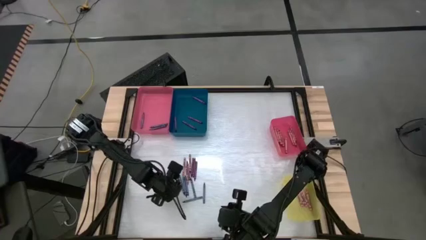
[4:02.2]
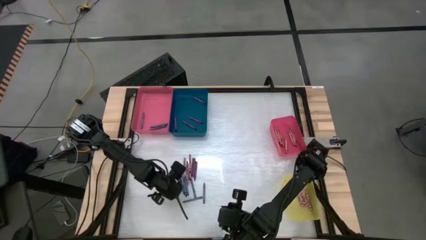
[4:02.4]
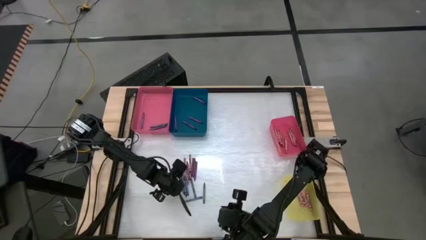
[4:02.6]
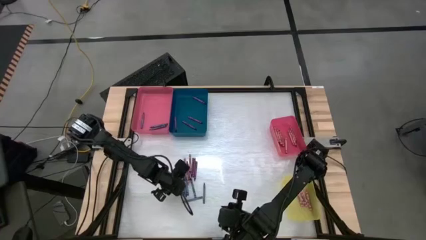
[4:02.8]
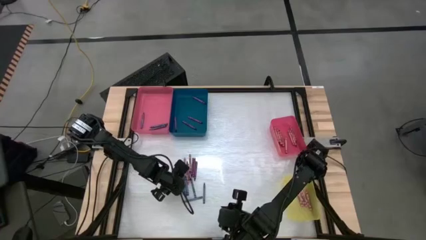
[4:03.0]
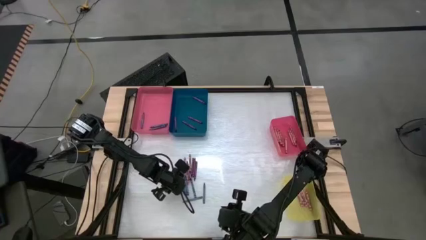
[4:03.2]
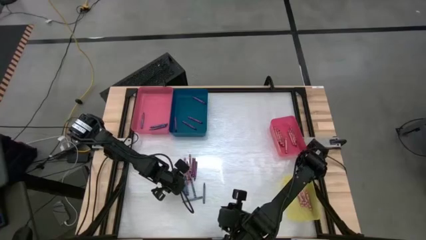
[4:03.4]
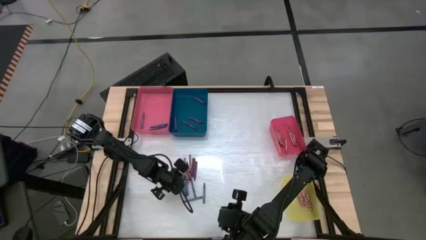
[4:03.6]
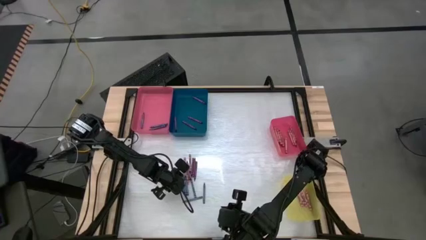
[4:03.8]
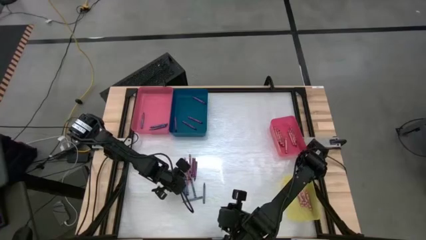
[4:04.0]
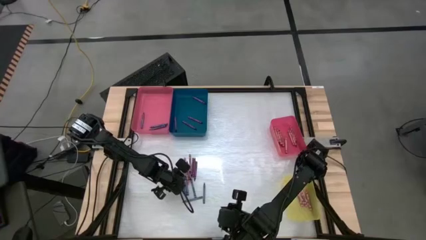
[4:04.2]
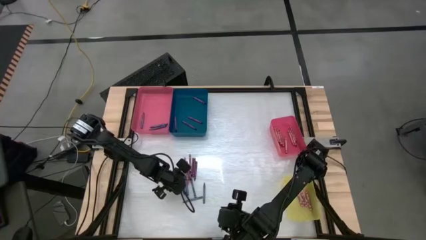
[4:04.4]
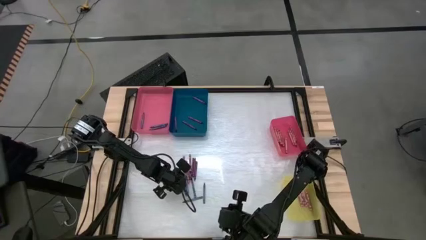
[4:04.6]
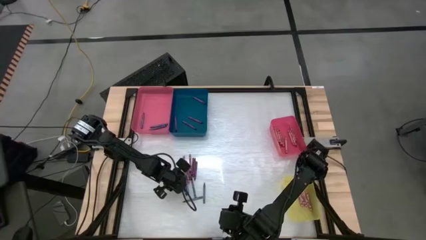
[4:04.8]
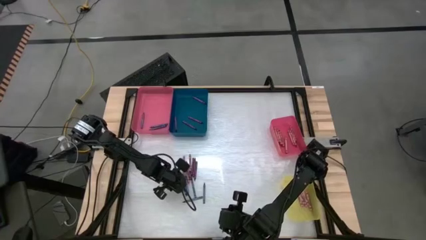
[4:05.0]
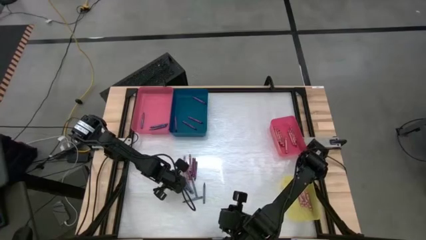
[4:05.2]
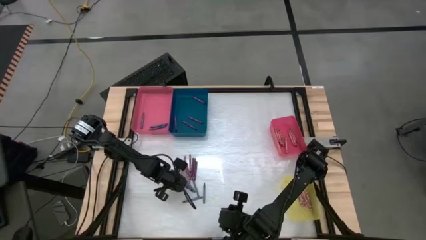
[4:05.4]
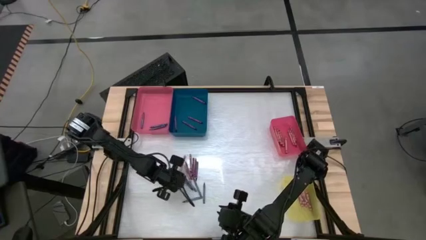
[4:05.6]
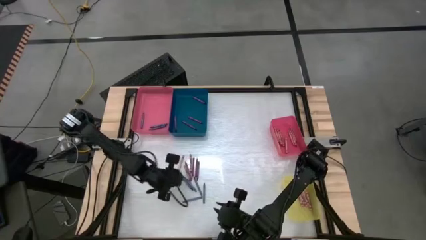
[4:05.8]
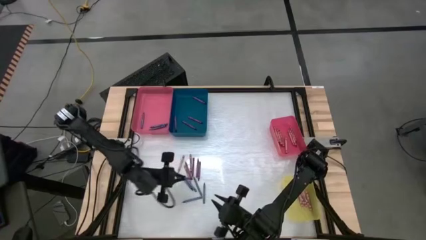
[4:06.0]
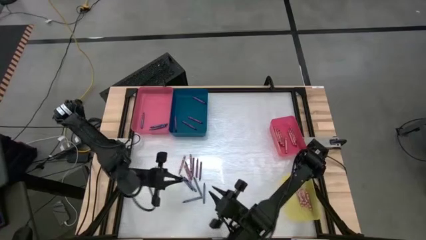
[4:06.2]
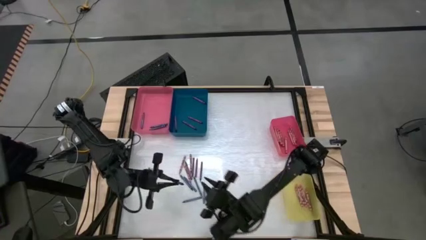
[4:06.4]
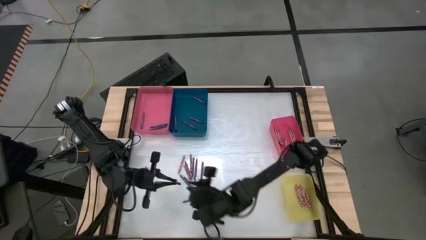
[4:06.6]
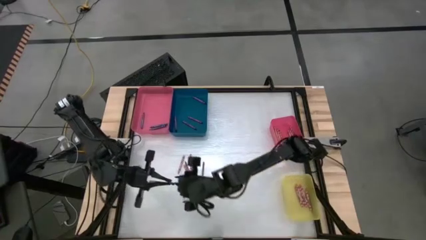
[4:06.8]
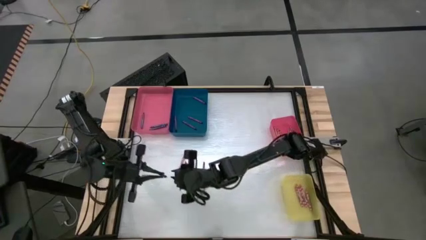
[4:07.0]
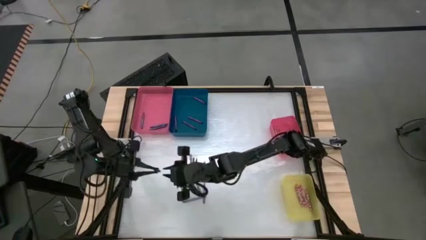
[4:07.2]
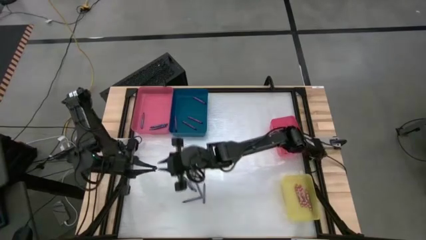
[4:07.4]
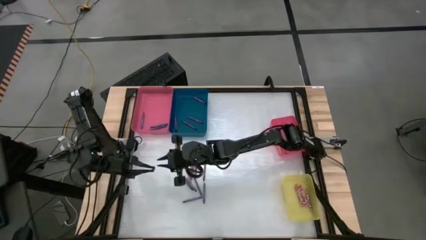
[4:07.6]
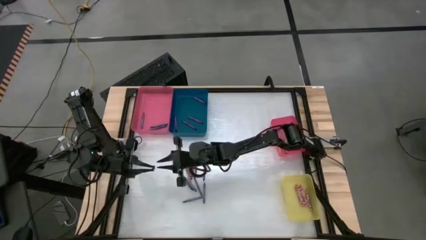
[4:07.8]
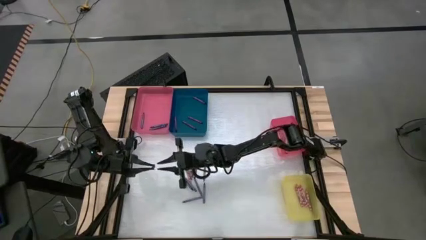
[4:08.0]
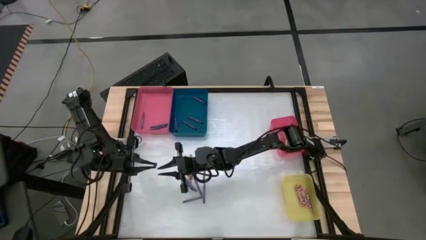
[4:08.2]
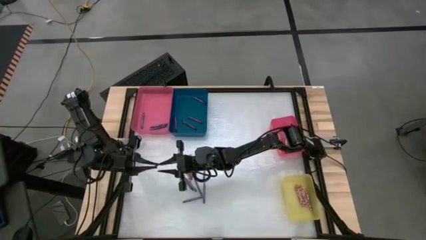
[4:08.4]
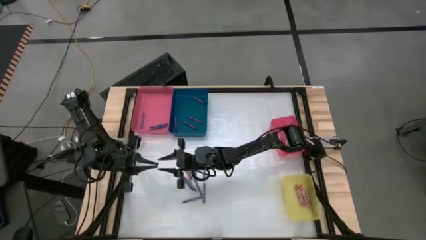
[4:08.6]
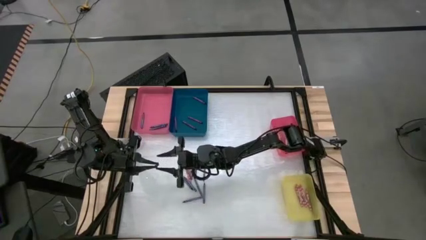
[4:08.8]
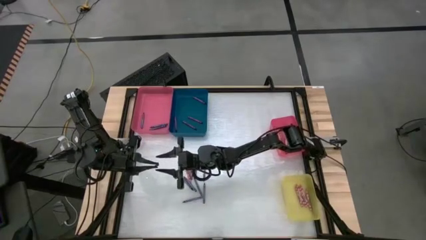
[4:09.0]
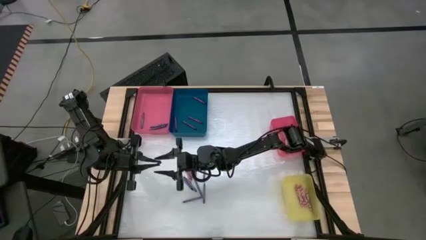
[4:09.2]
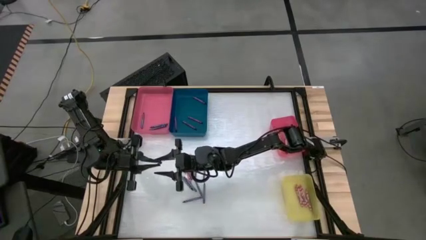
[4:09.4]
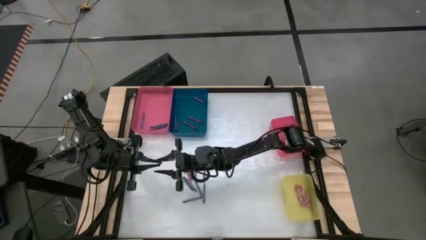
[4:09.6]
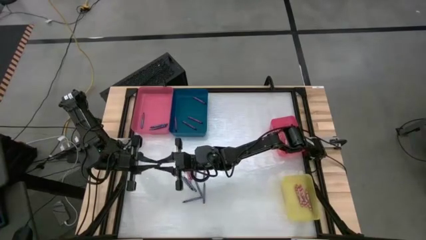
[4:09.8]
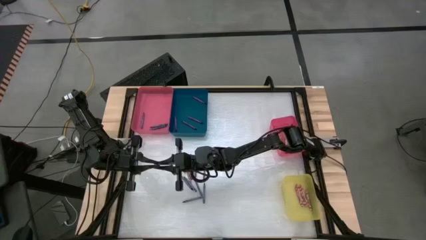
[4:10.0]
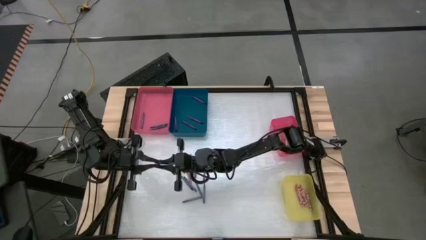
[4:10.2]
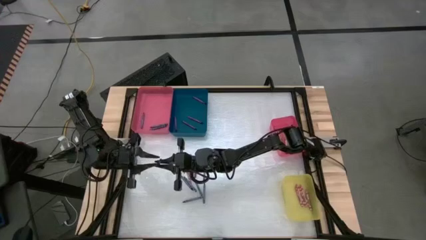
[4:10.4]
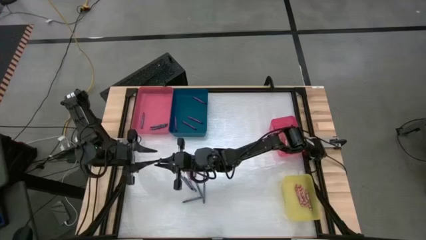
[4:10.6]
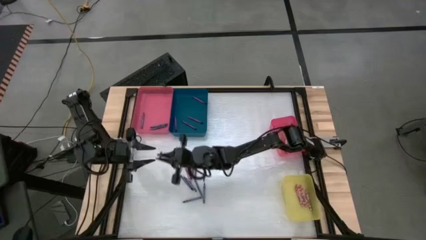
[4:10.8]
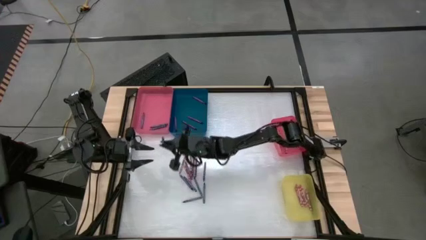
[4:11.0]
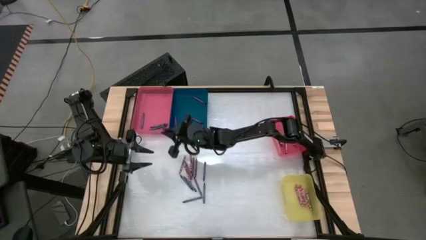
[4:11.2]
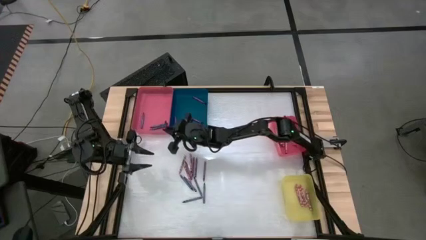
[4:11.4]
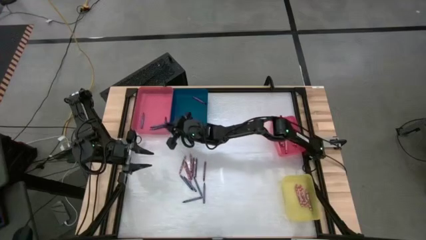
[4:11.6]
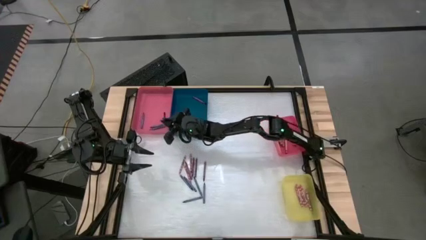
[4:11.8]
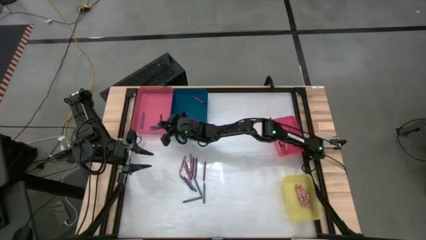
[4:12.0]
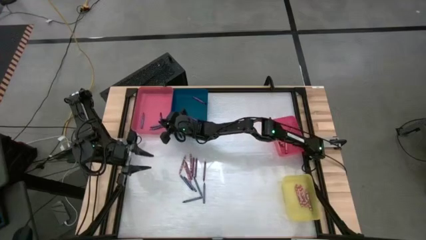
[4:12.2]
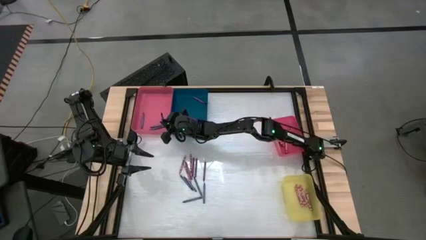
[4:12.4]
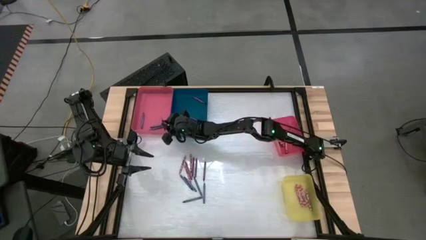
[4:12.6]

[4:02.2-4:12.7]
Task: Sort crayons
Put the blue crayon into the large red bin
